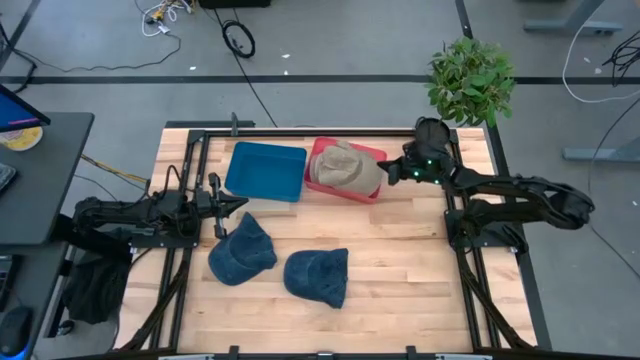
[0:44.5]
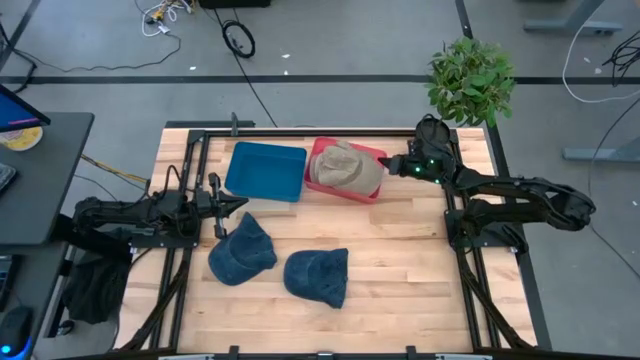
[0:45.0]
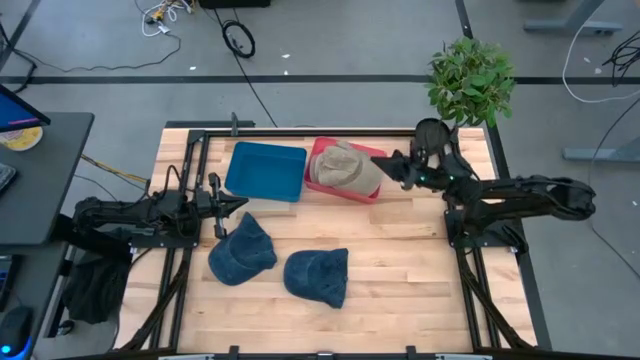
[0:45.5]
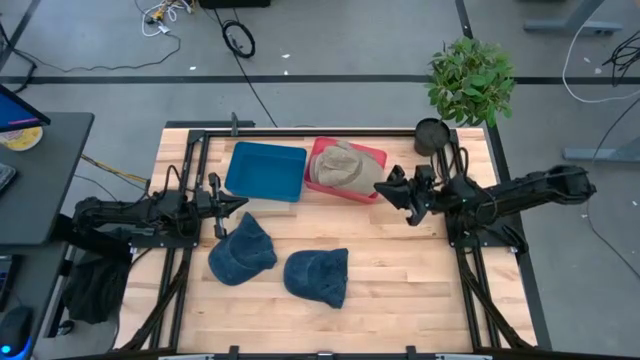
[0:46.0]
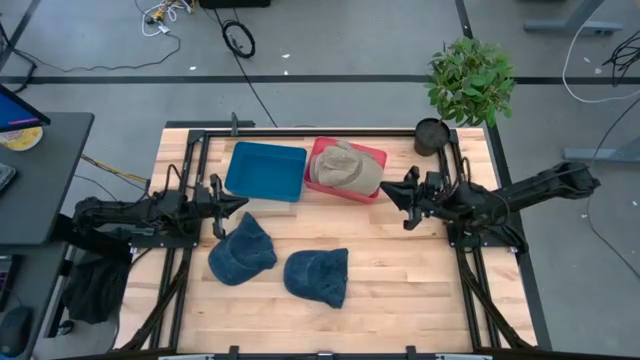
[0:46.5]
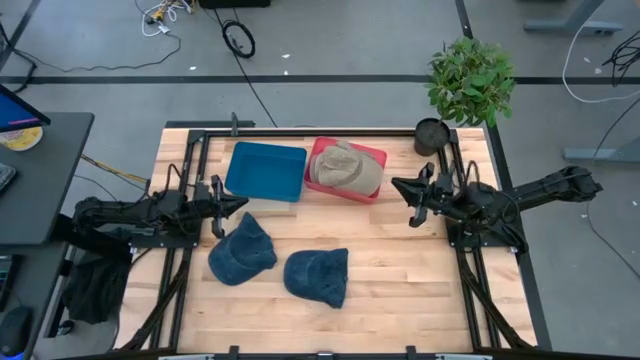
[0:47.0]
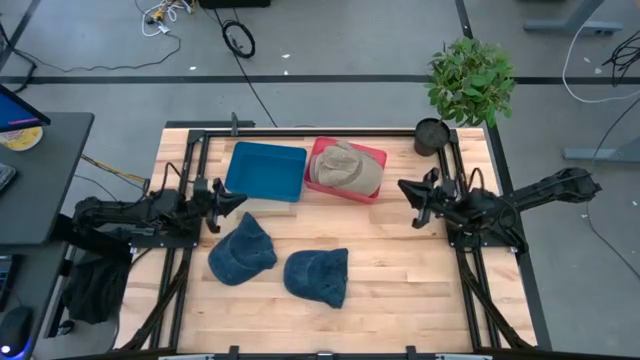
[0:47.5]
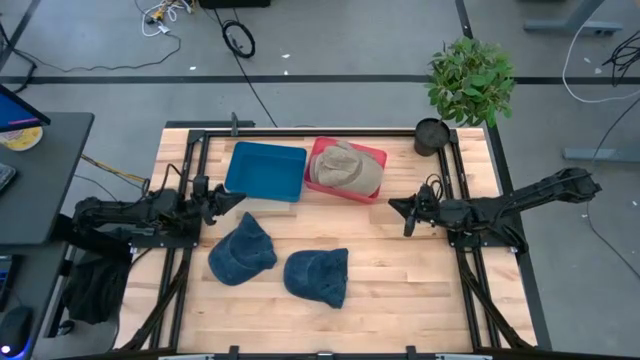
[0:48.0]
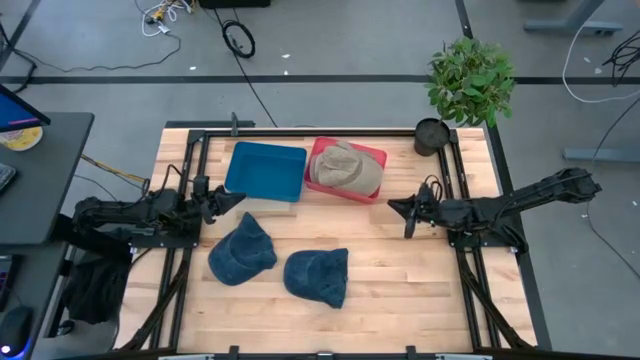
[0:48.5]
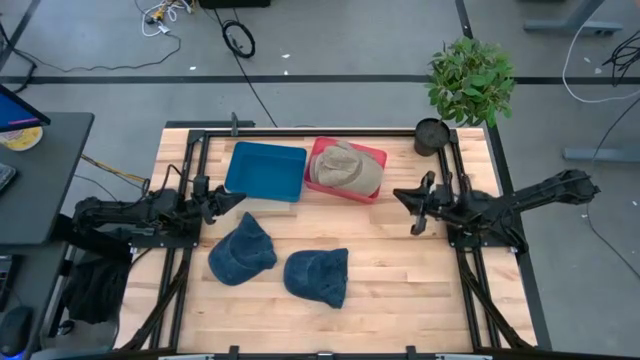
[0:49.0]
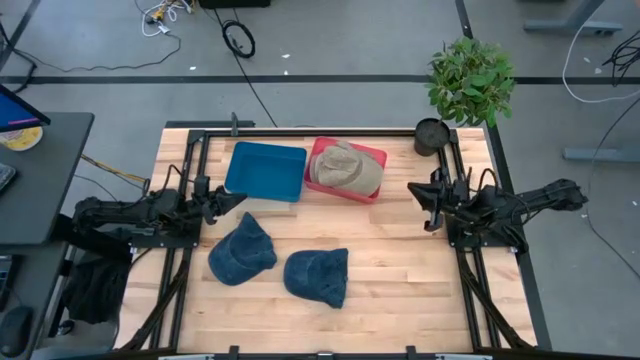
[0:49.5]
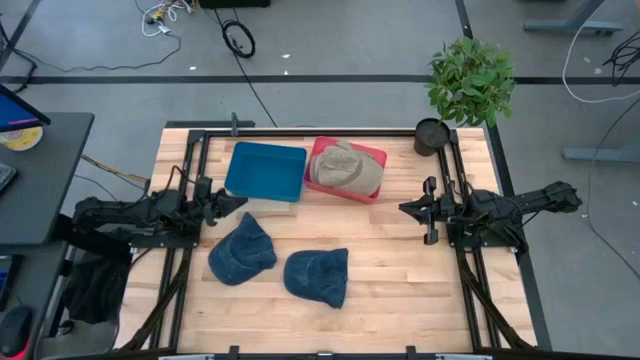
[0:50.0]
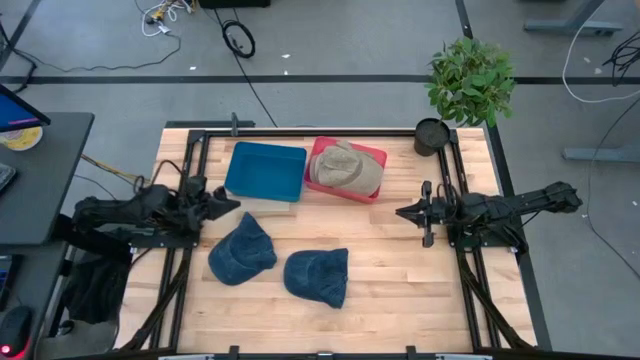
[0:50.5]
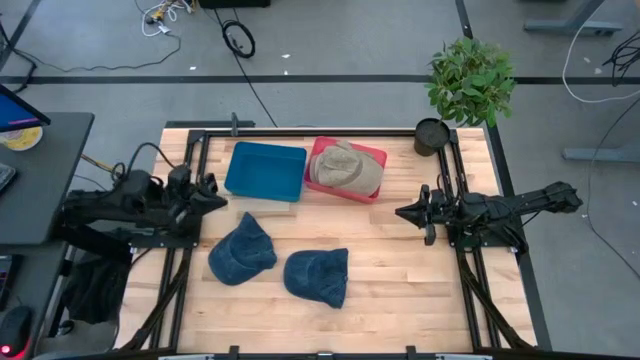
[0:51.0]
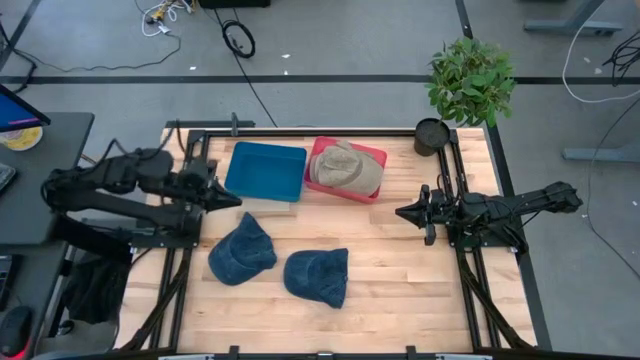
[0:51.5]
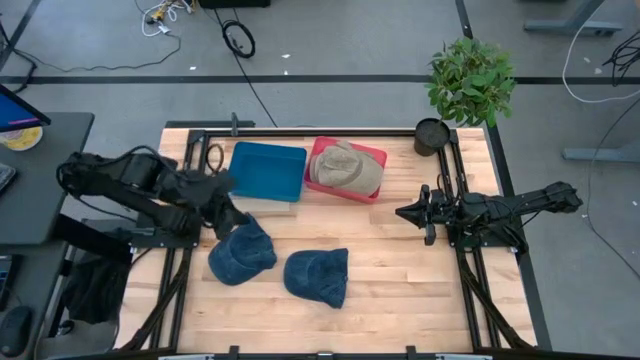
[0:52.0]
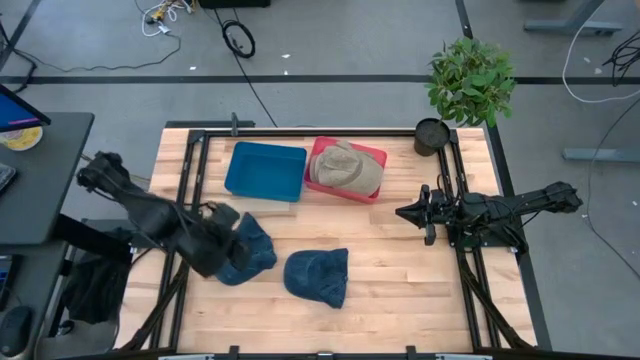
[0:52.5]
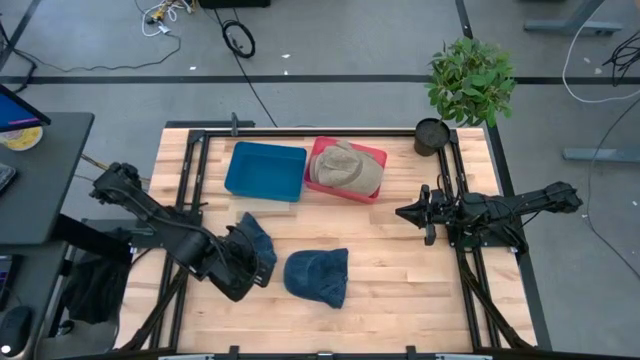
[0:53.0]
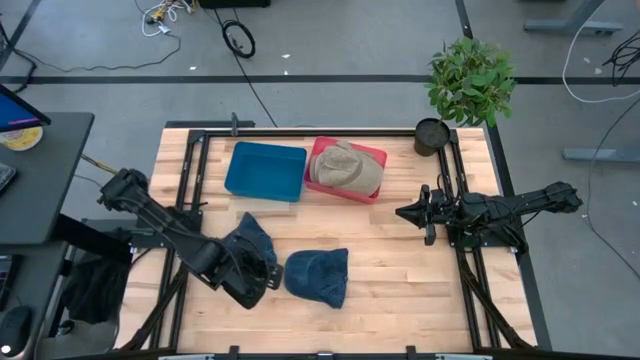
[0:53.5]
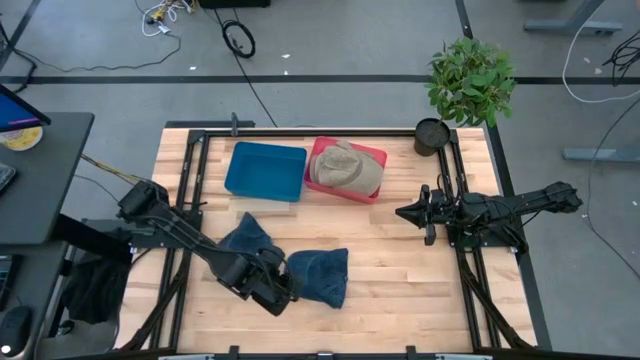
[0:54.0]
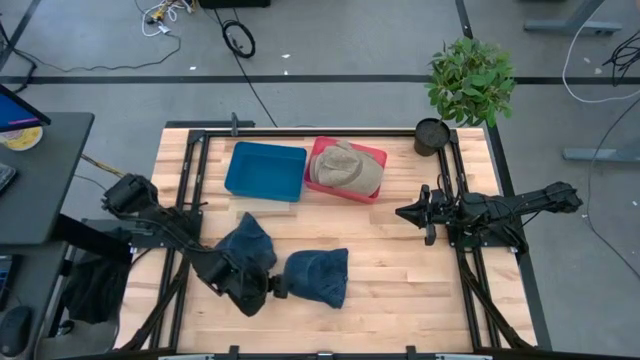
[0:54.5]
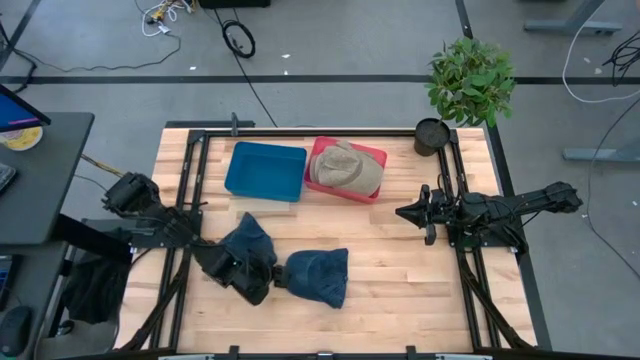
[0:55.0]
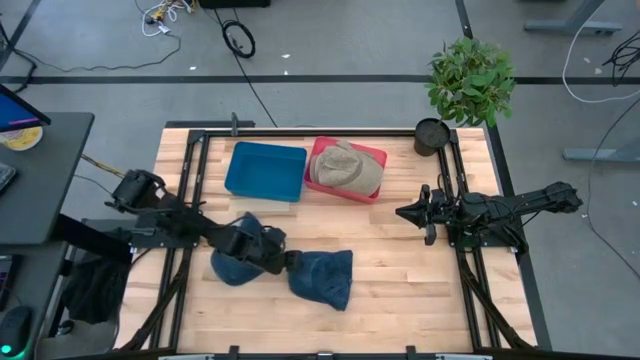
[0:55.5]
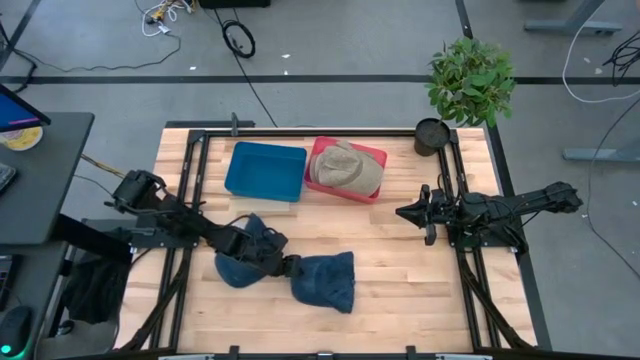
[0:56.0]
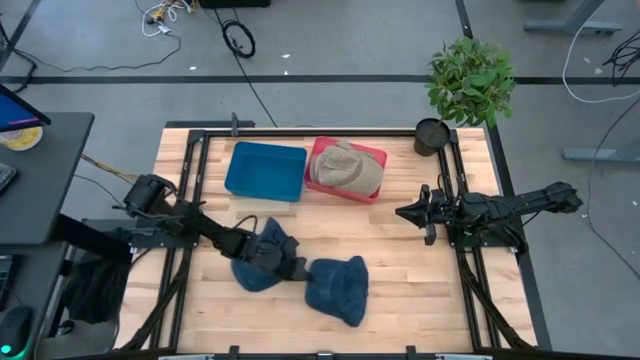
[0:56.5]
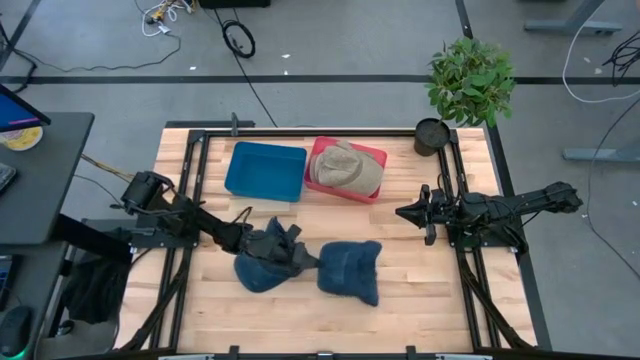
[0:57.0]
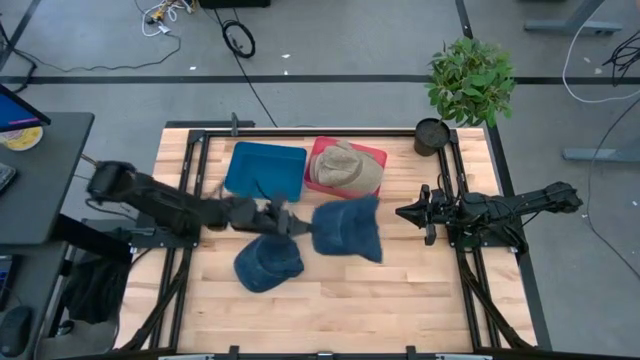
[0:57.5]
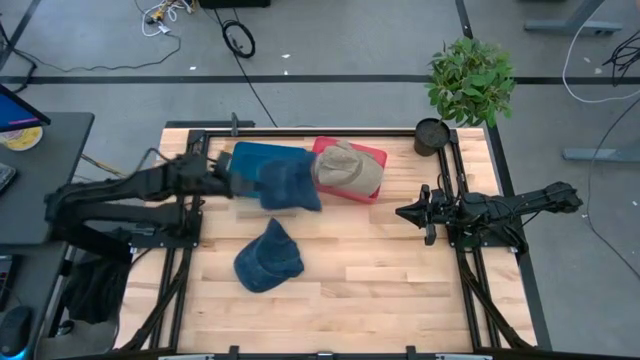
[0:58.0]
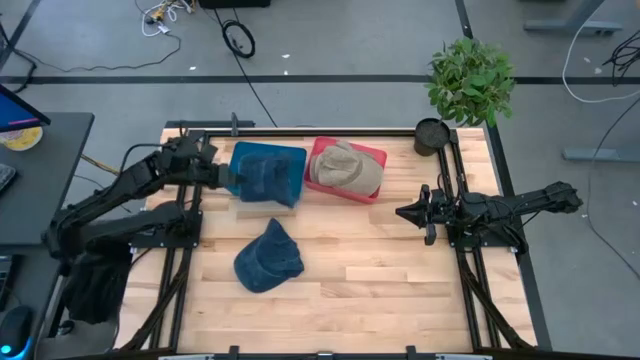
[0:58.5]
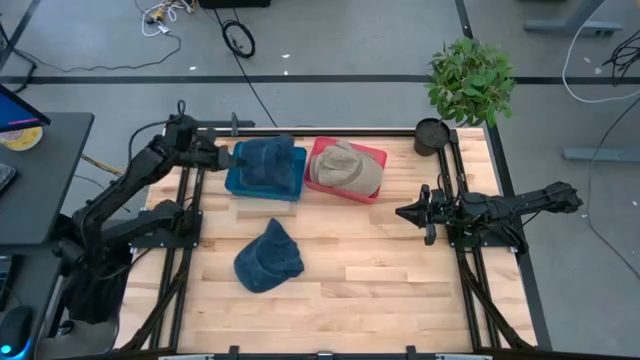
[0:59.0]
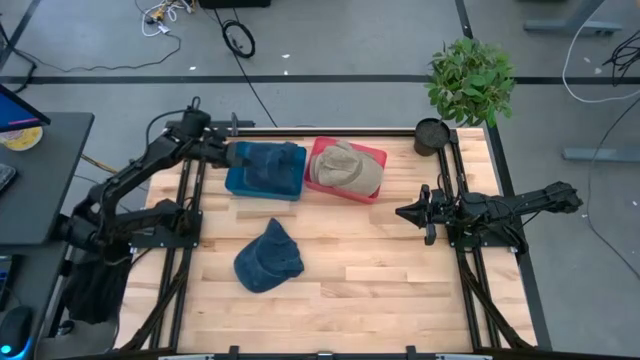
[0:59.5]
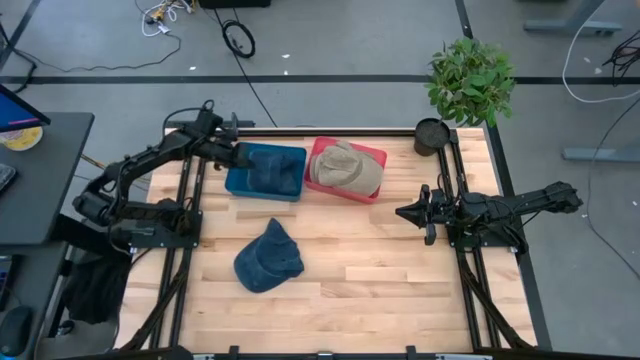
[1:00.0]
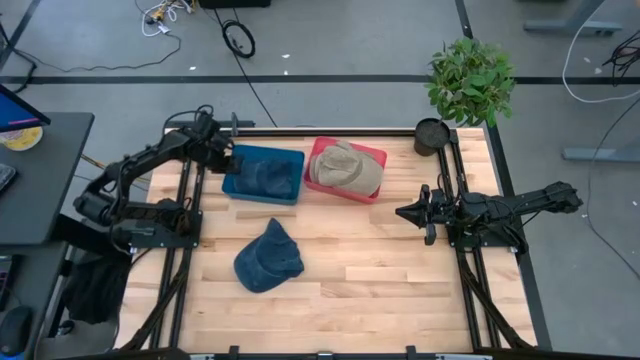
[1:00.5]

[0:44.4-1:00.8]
Task: Pick & Place hat
Put the right blue cap into the blue bin

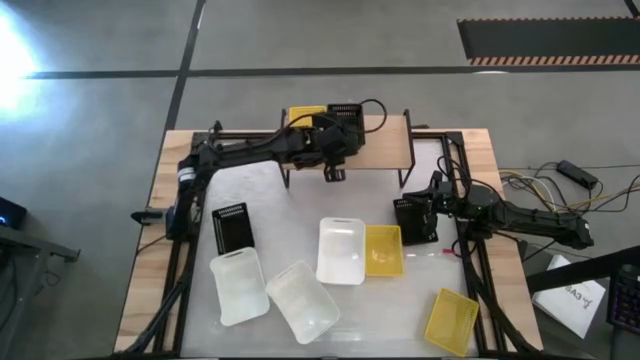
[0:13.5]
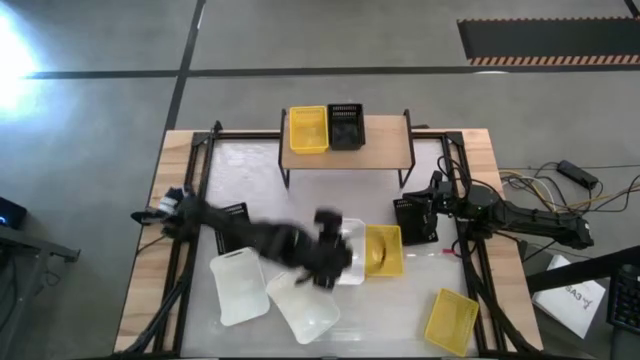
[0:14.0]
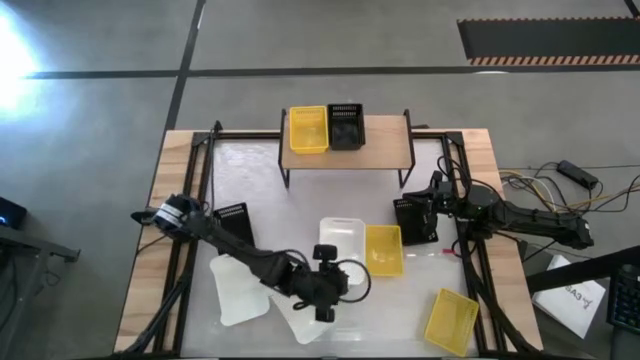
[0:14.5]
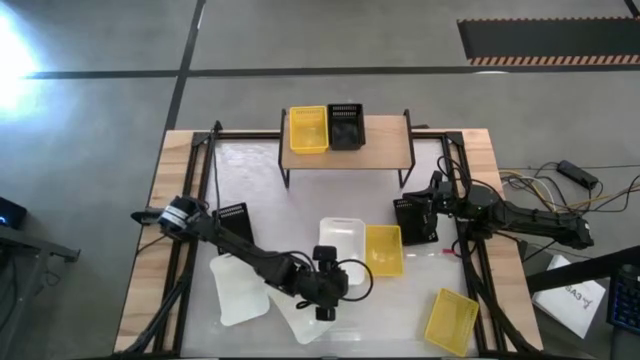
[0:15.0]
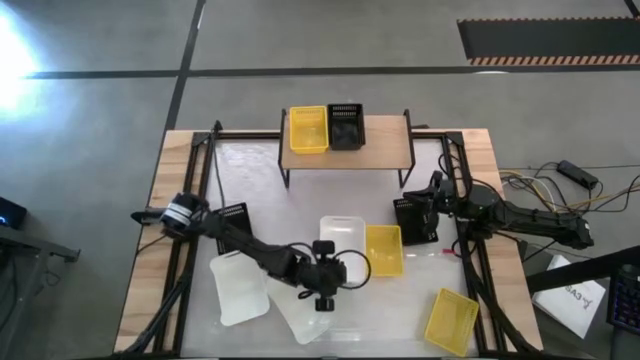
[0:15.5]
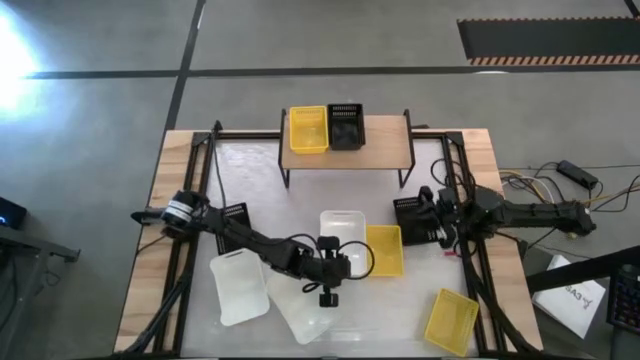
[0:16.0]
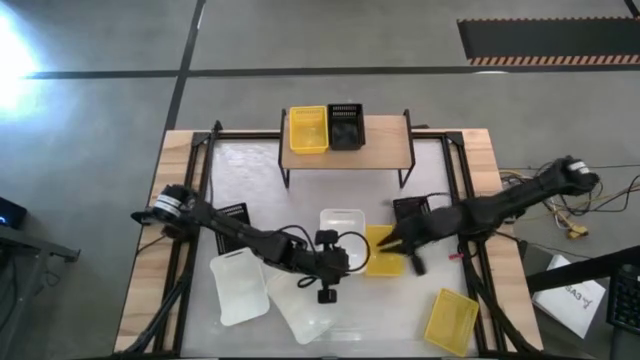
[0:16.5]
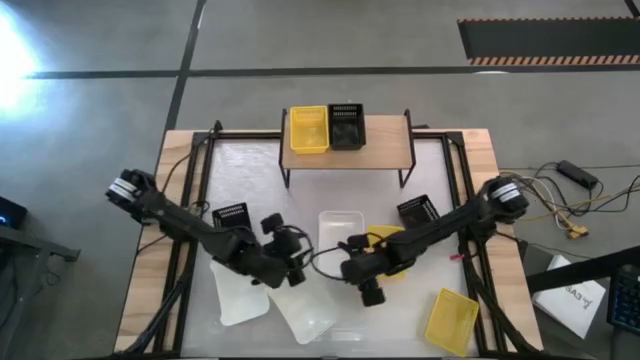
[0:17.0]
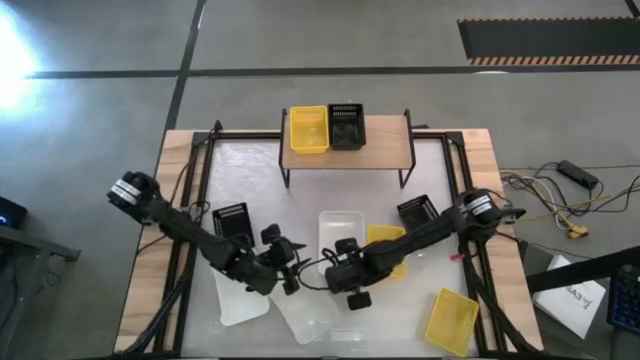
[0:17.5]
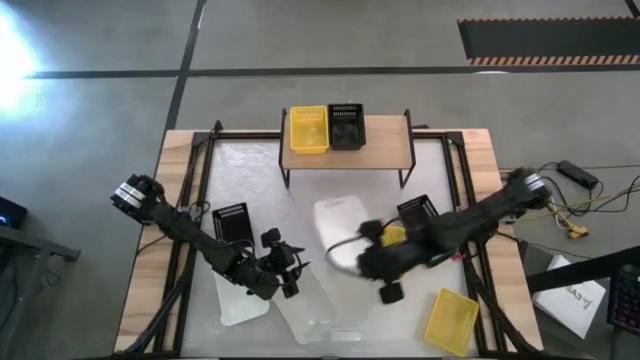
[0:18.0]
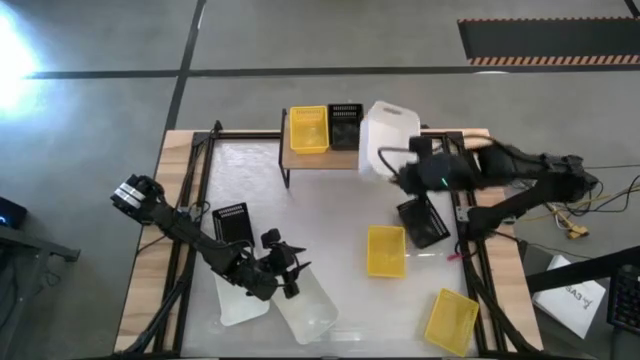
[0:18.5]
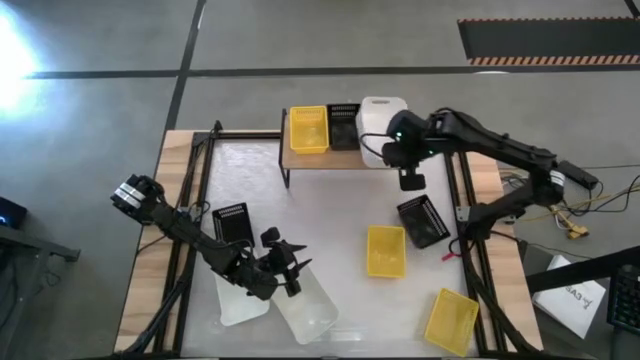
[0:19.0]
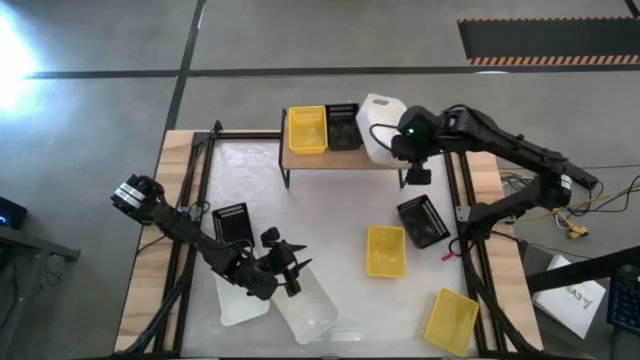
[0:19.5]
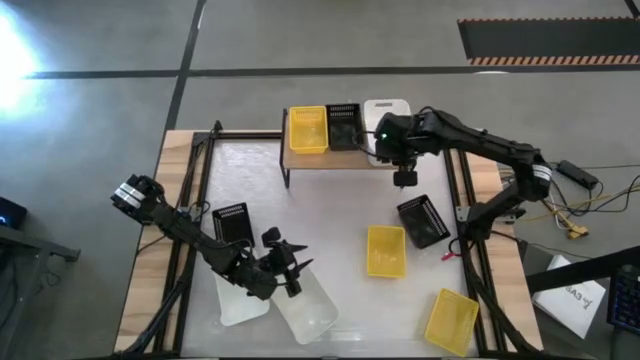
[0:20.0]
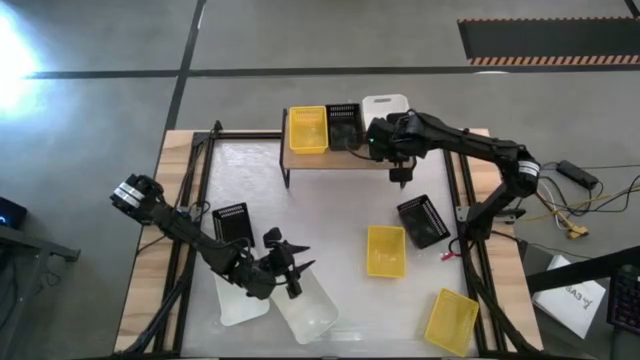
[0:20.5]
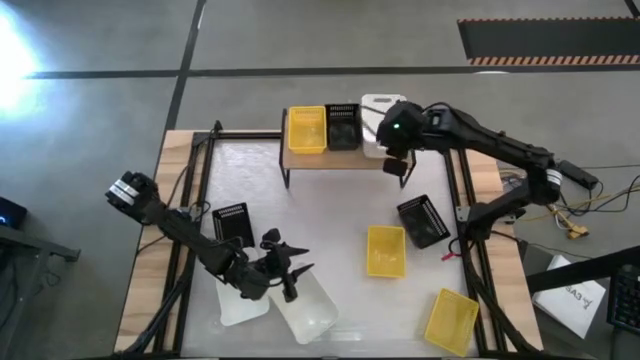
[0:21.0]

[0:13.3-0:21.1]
Task: Stack baskets on shelf by color
Put the top white bin on the shelf
